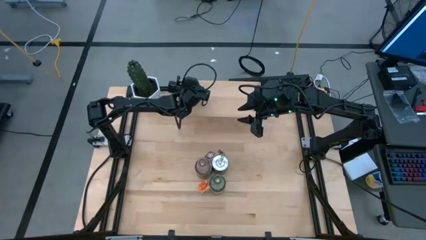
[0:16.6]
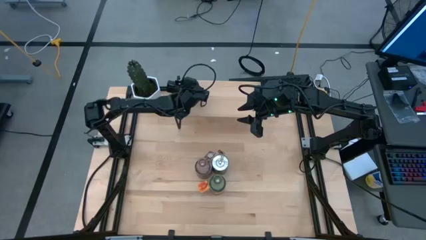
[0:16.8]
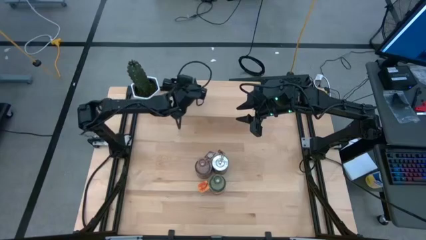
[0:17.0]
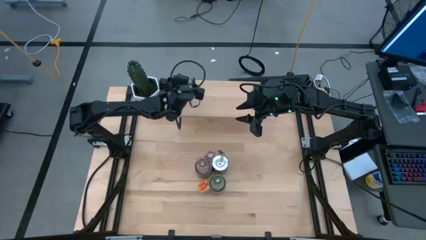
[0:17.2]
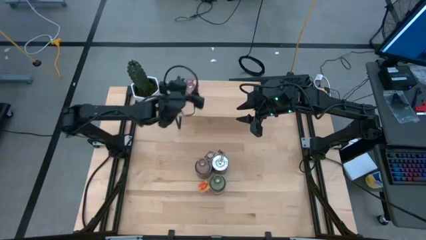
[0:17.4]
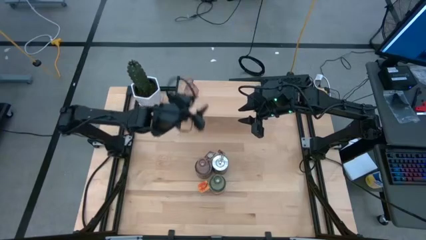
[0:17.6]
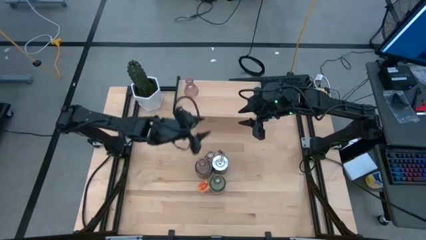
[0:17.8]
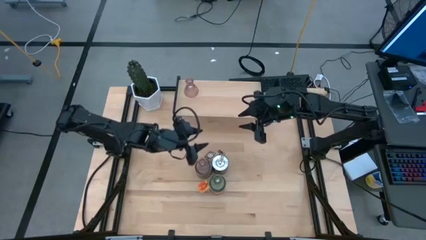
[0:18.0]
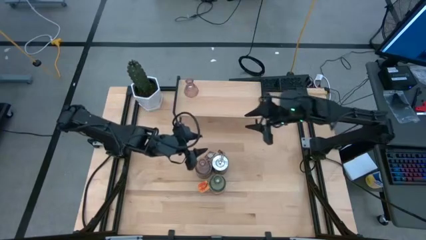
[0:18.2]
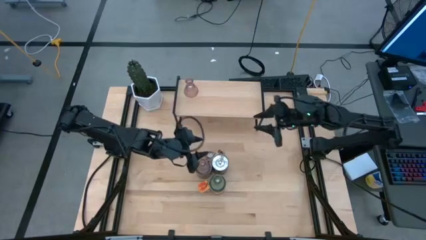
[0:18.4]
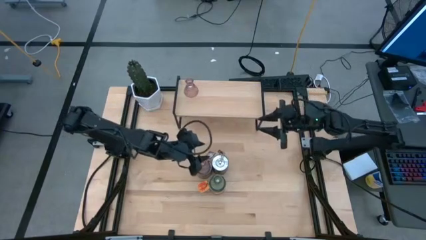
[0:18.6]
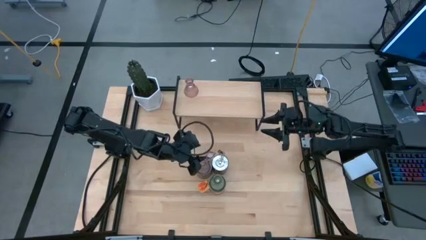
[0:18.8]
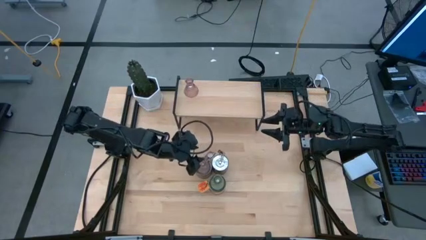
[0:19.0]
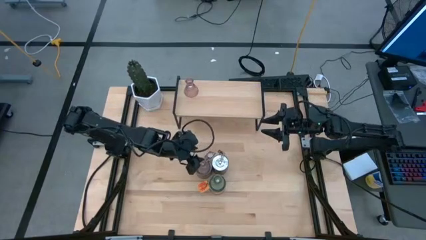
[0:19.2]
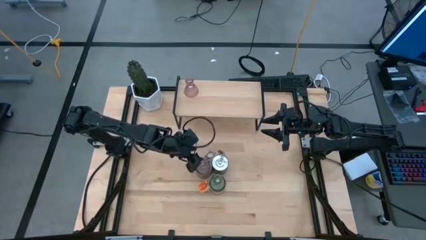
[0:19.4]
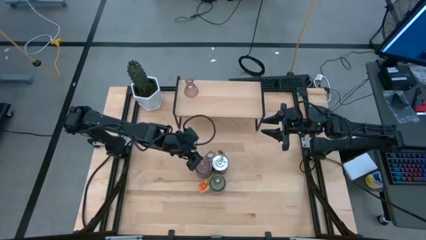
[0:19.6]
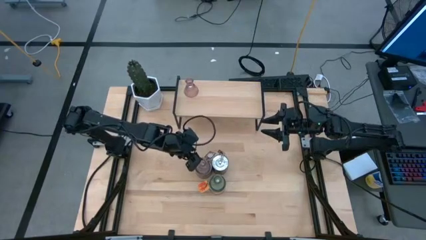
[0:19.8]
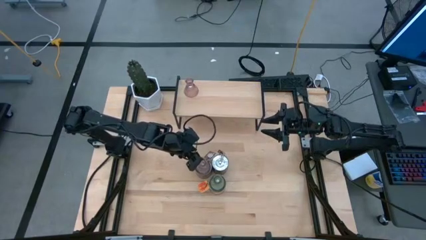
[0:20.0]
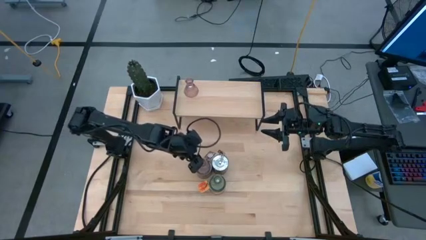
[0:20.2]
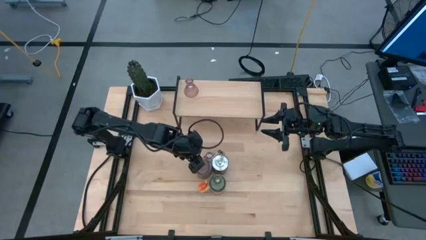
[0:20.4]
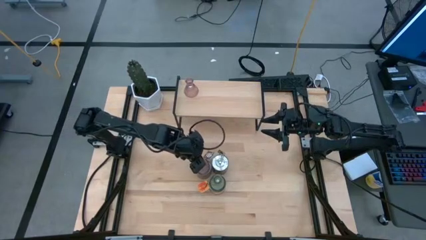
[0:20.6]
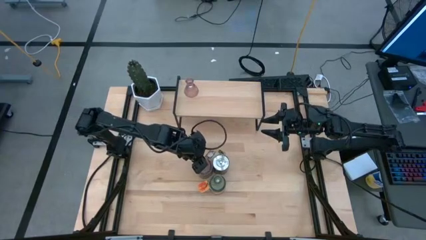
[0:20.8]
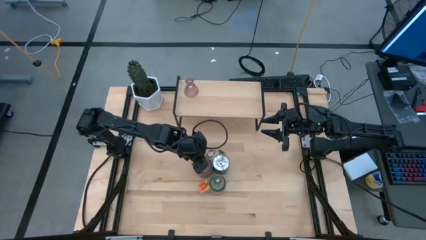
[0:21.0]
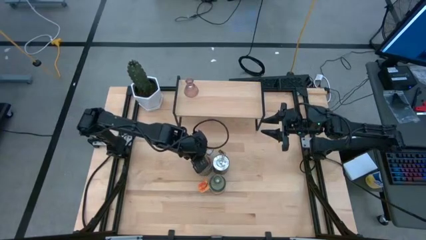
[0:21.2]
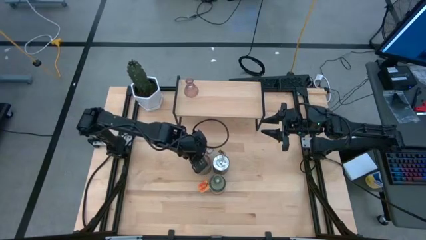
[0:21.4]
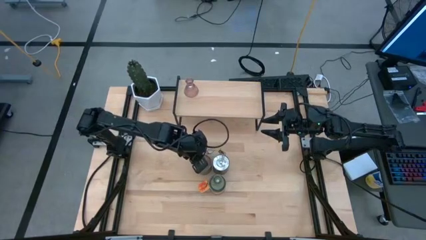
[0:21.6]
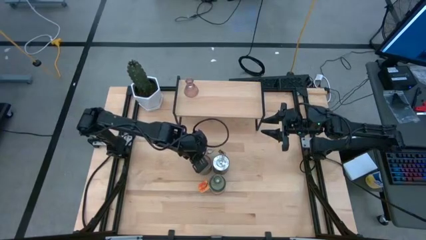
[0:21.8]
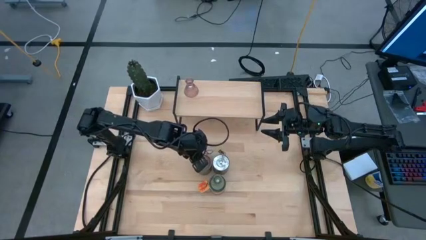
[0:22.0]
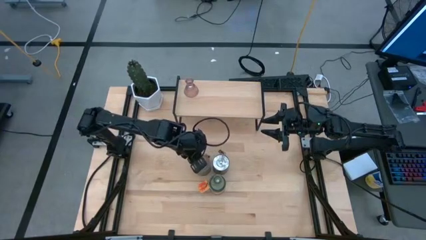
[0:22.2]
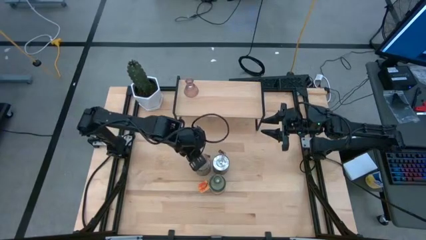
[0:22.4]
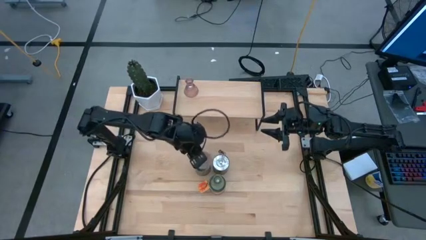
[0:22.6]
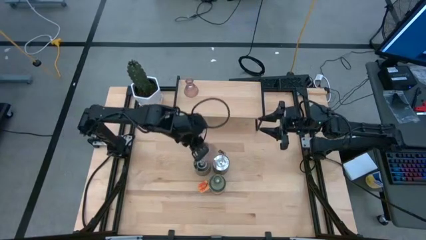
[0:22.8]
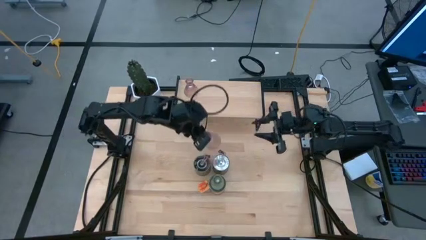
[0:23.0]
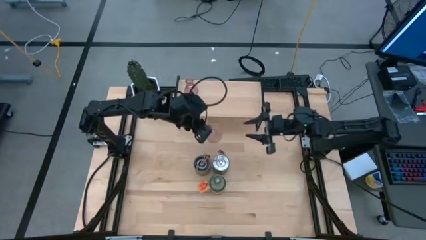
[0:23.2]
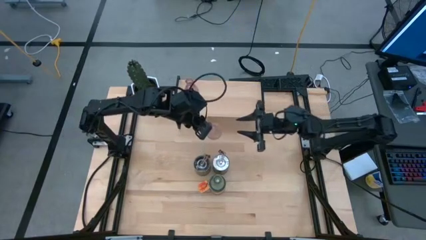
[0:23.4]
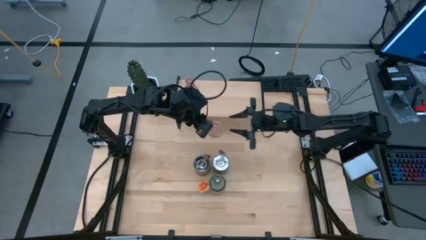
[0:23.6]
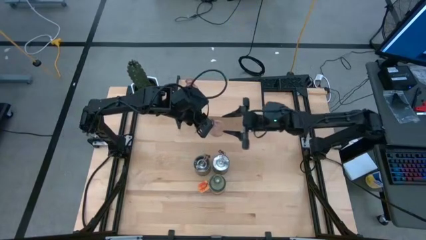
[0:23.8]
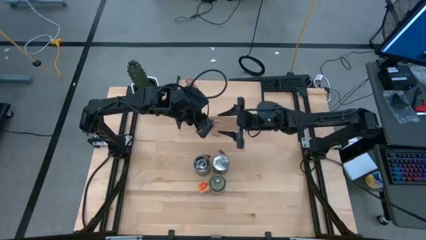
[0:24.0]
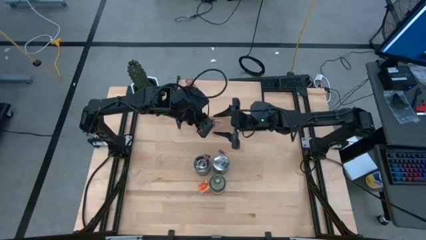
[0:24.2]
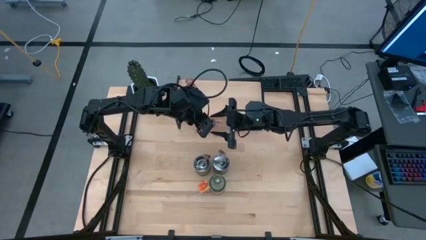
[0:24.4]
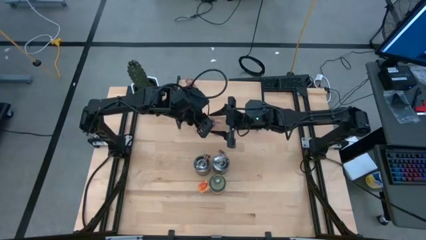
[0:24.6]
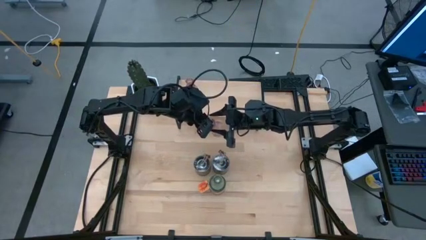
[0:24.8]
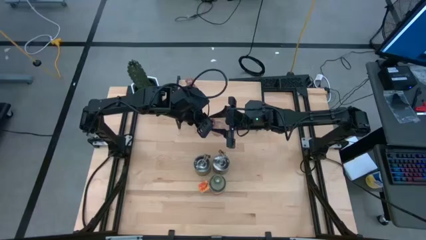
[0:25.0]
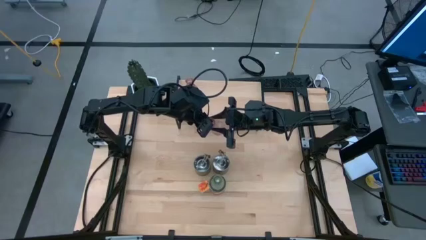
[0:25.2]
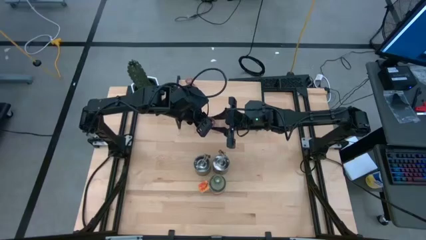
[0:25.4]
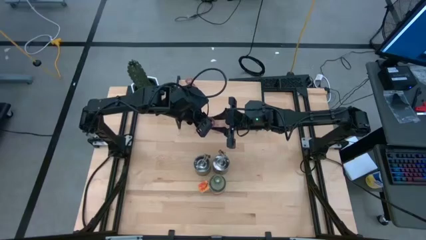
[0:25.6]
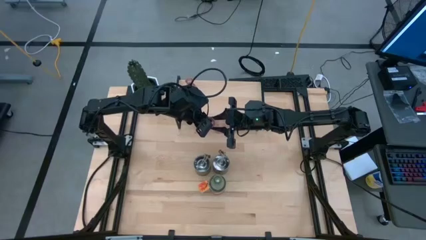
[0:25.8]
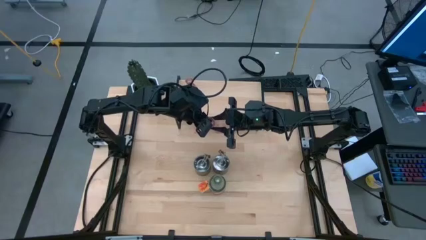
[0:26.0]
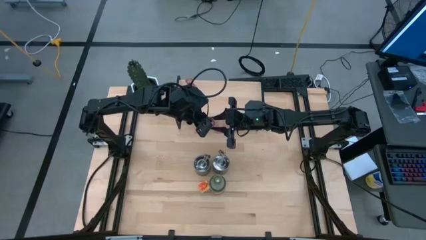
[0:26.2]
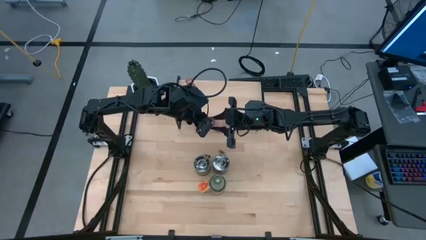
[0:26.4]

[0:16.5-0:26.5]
Task: Pick & Place candle stick holders
Put the pink glass candle holder on the shelf
